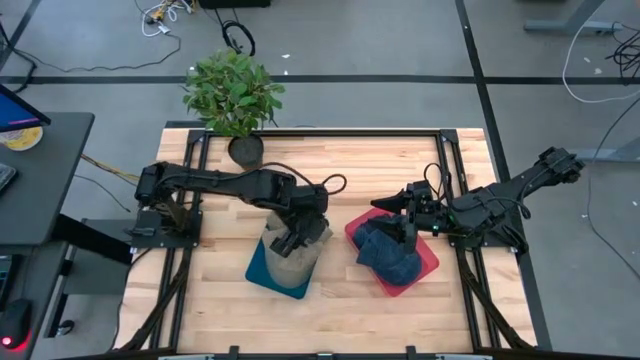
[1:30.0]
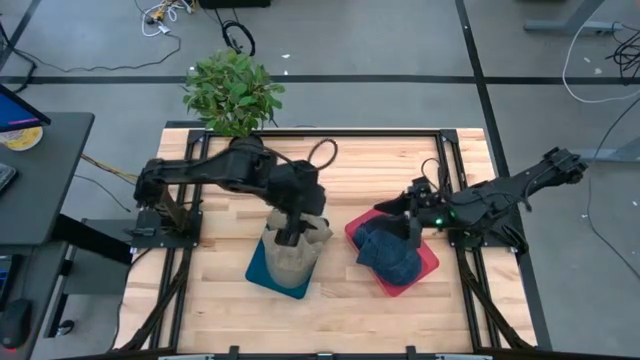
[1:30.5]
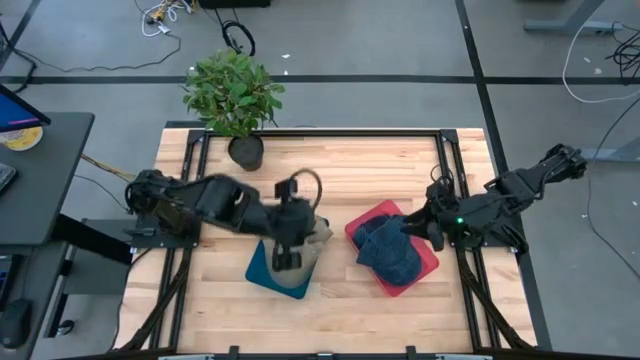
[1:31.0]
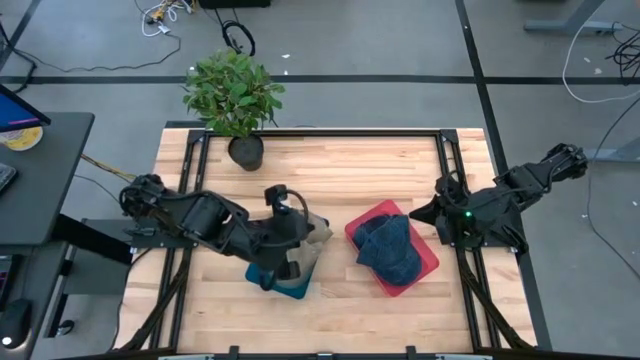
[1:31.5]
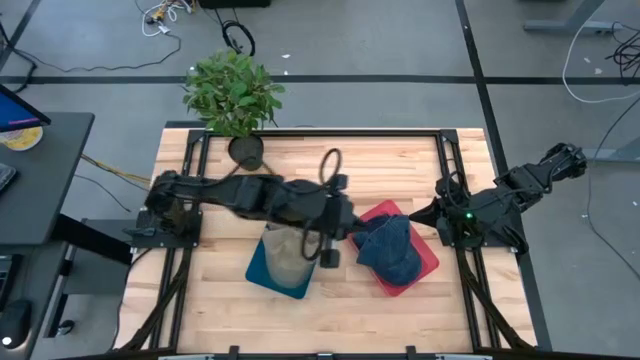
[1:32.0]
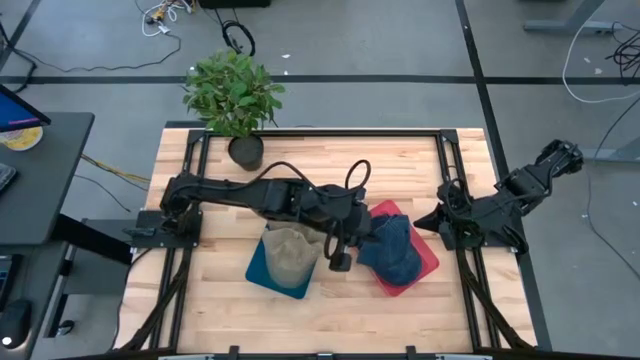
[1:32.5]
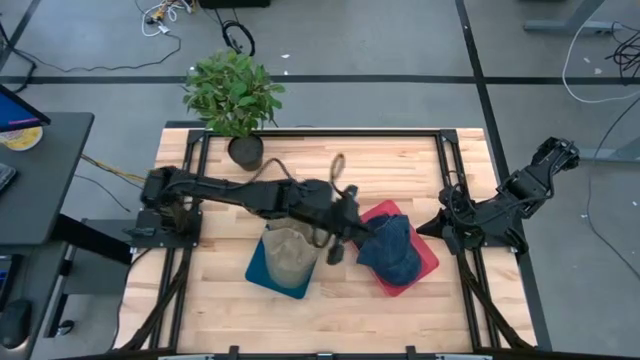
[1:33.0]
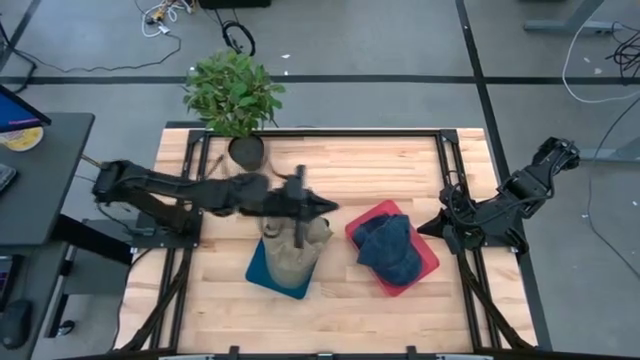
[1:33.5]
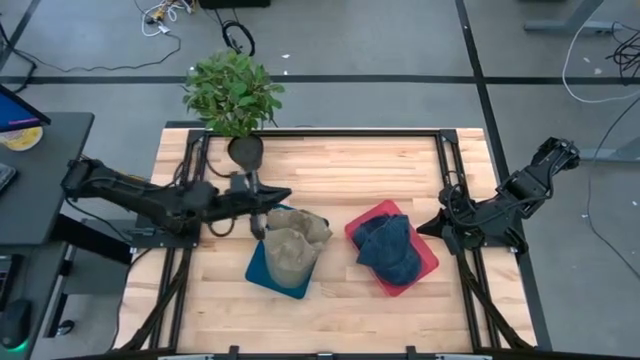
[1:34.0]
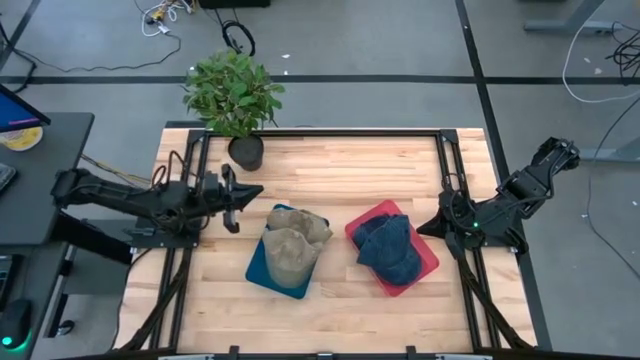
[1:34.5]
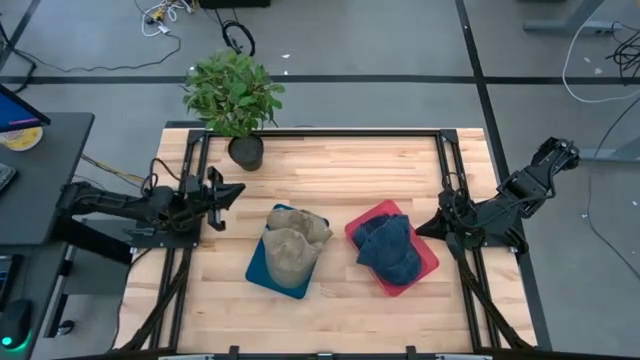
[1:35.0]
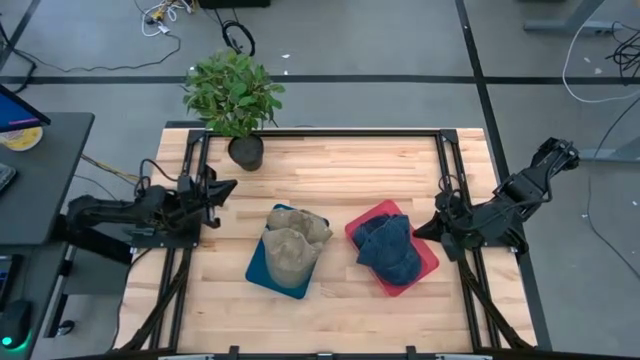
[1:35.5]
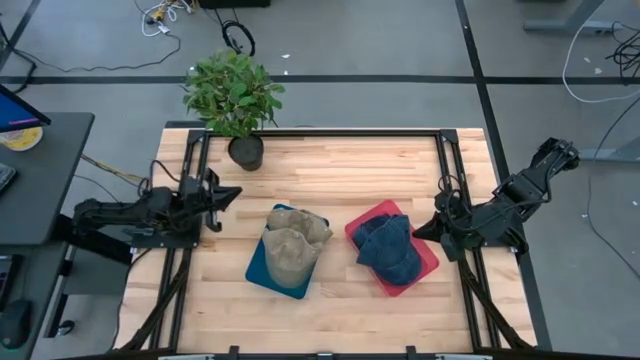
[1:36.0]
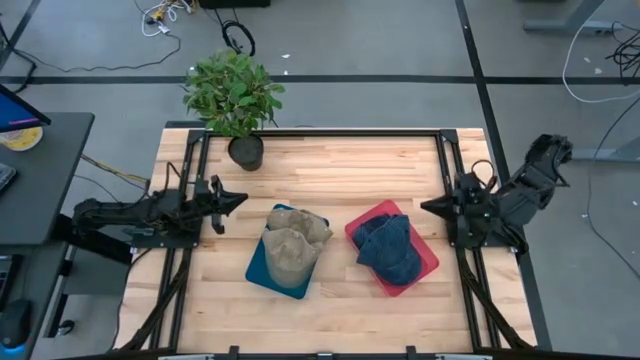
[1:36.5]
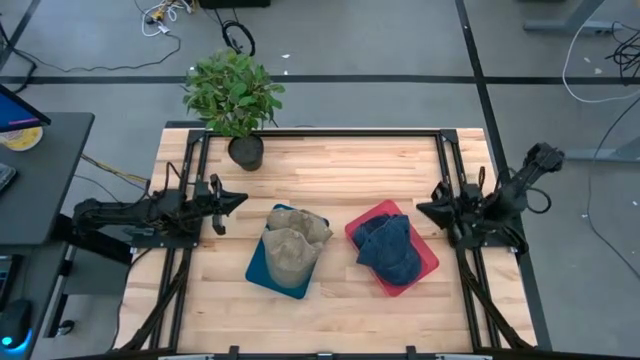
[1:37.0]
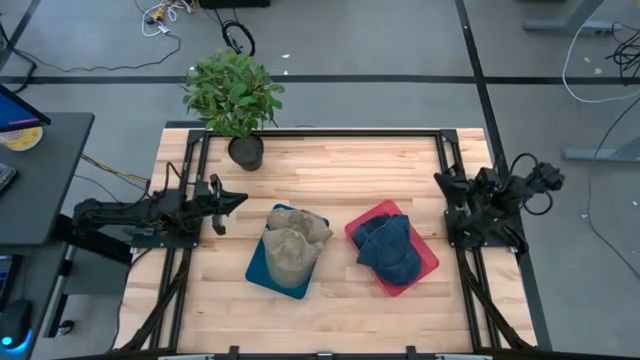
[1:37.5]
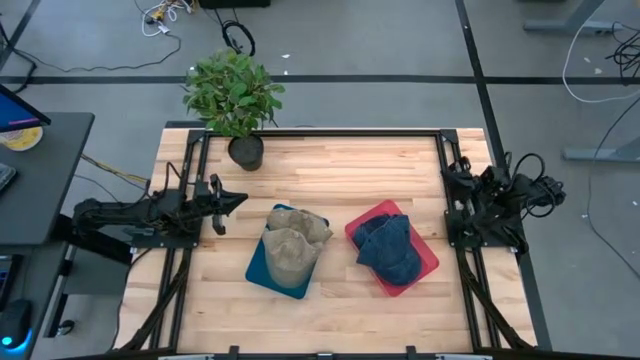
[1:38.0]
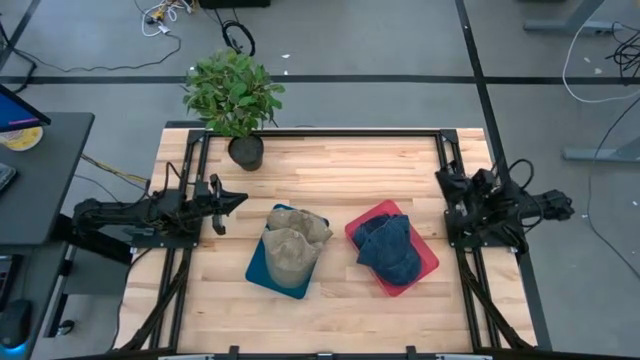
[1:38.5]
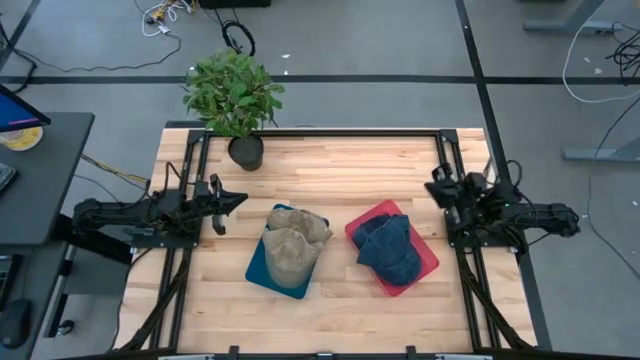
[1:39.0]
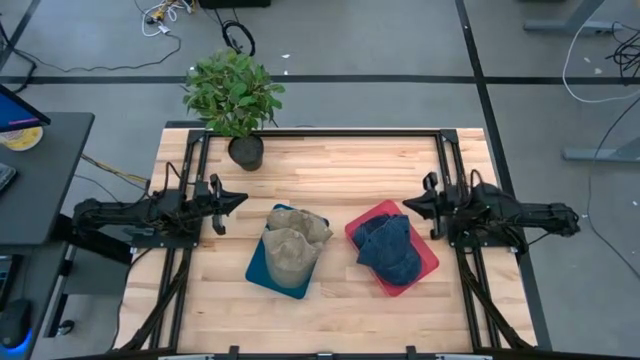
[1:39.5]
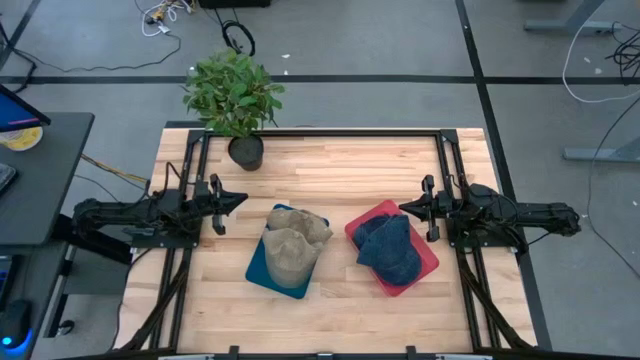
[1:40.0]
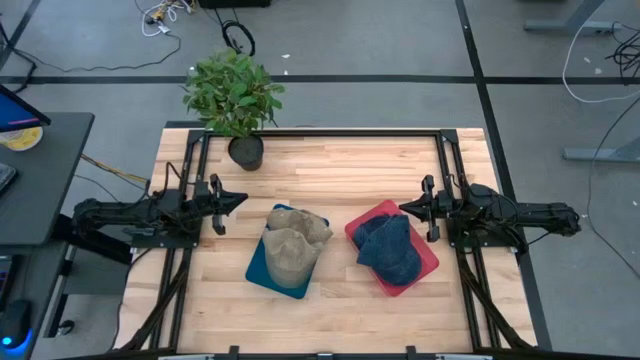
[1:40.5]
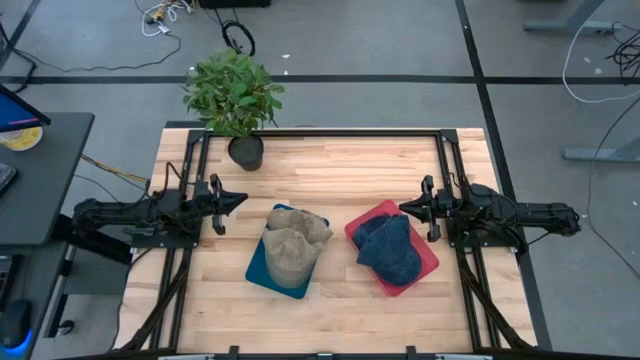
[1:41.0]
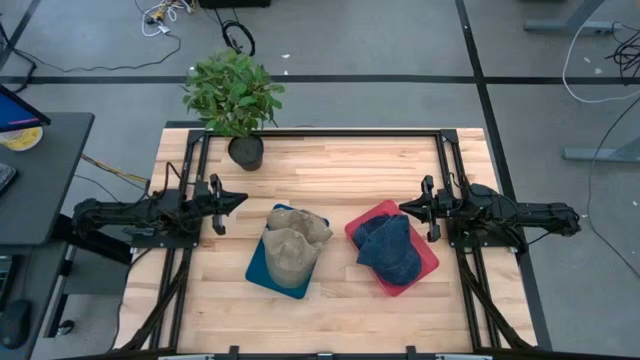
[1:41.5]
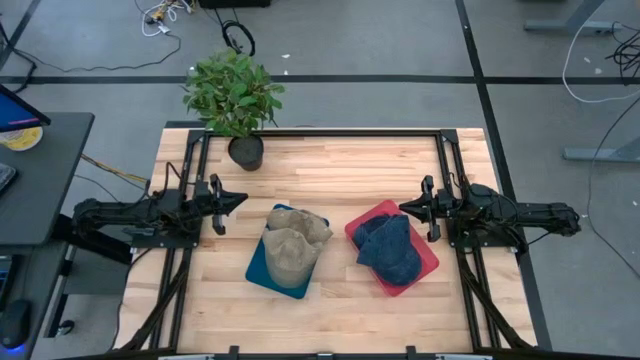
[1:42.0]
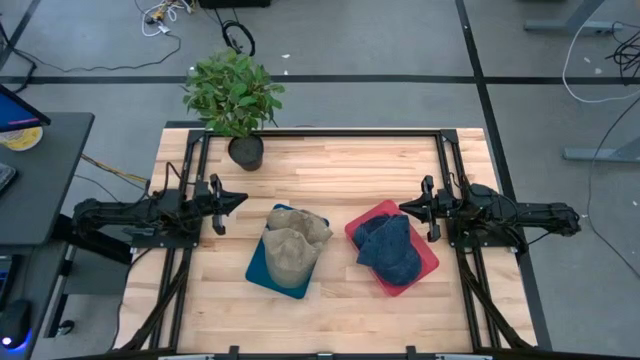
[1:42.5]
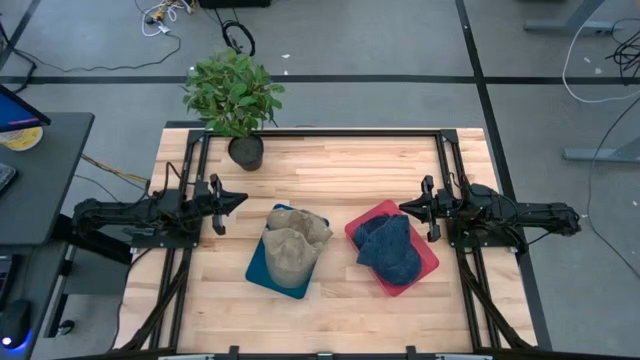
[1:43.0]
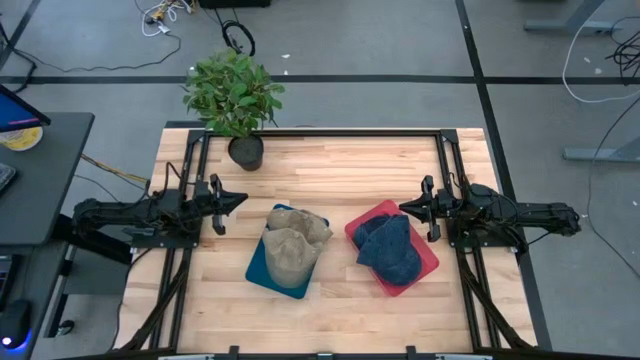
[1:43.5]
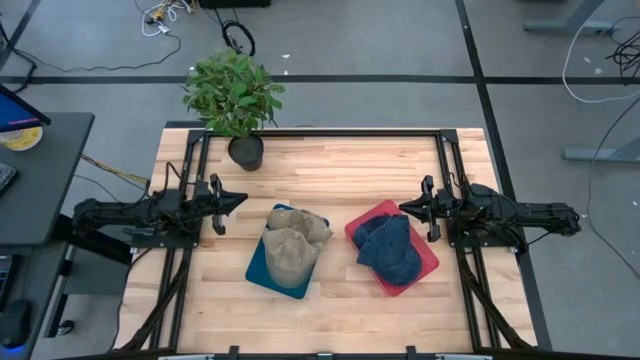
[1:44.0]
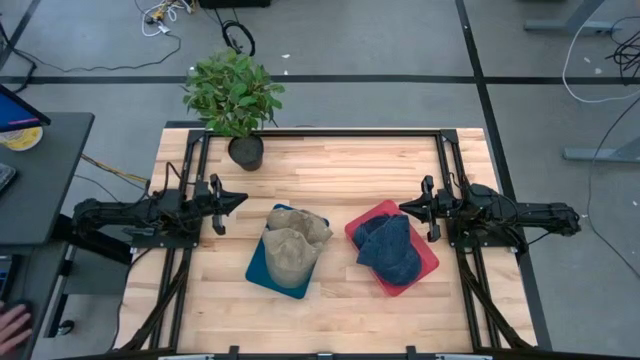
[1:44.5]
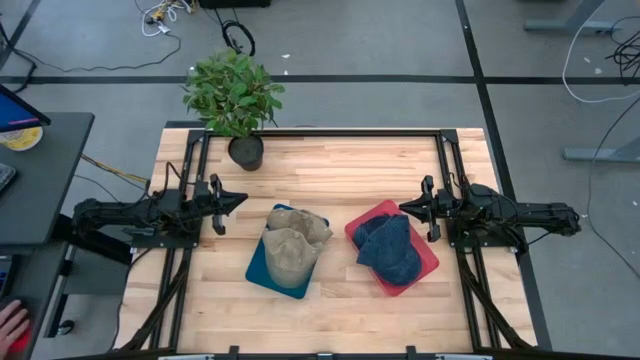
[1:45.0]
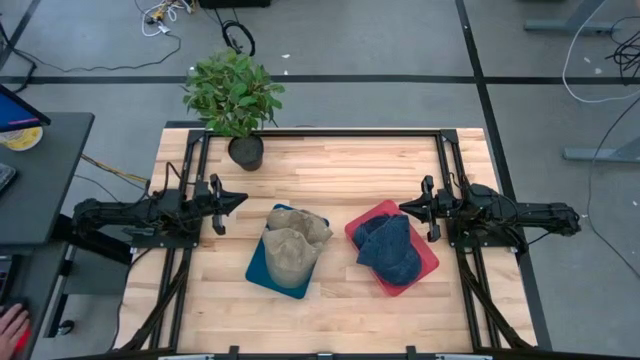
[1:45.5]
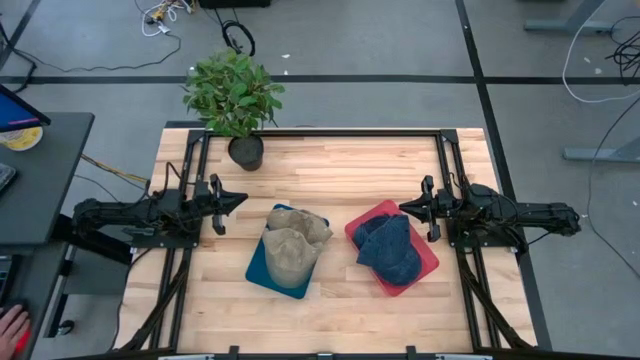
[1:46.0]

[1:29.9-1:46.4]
Task: Pick & Place hat
Return to Home Position

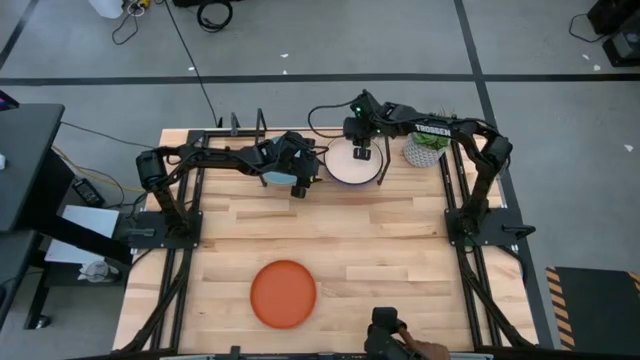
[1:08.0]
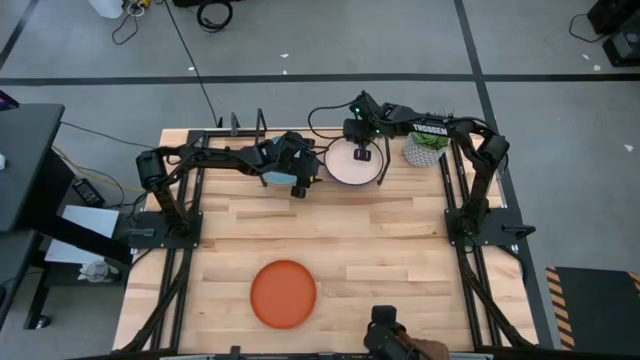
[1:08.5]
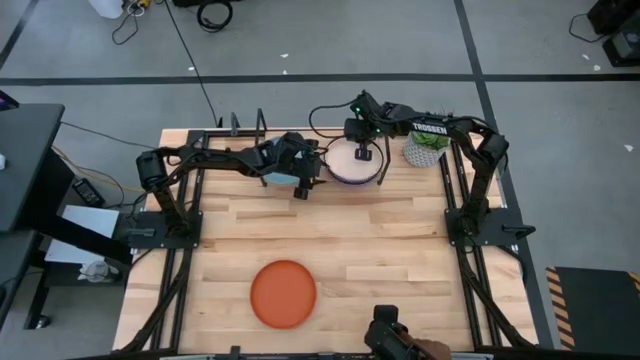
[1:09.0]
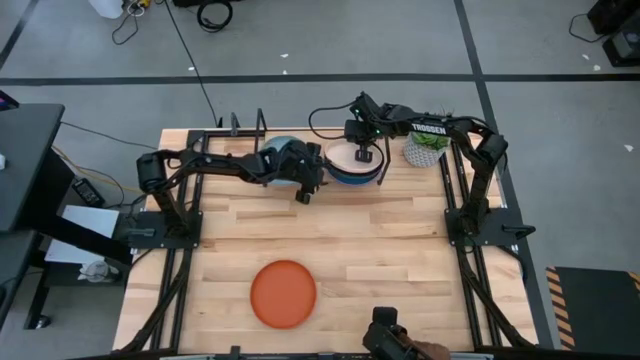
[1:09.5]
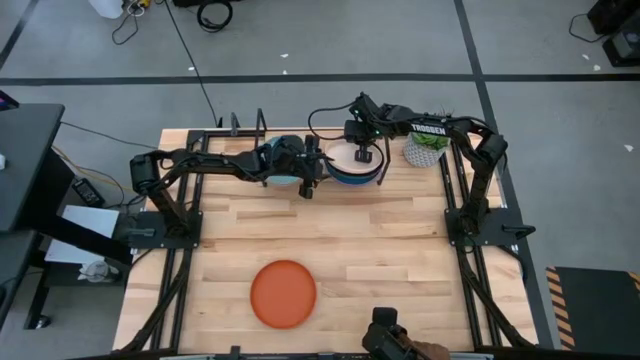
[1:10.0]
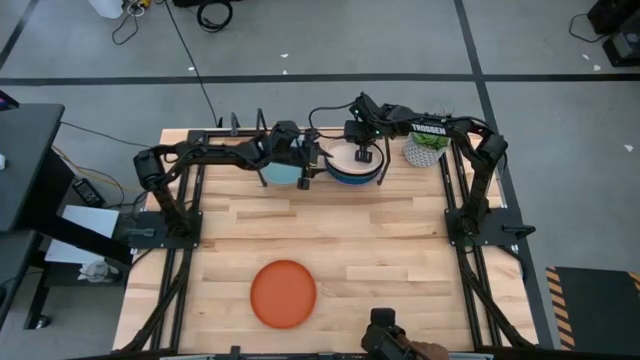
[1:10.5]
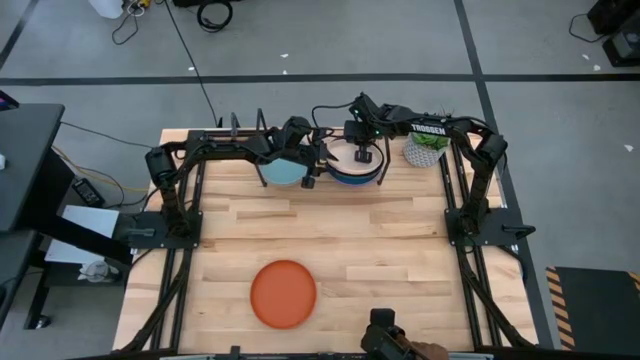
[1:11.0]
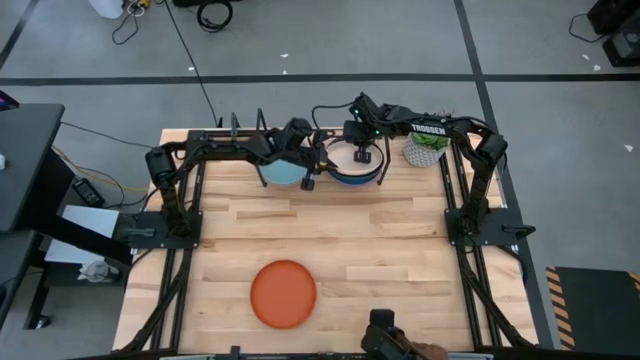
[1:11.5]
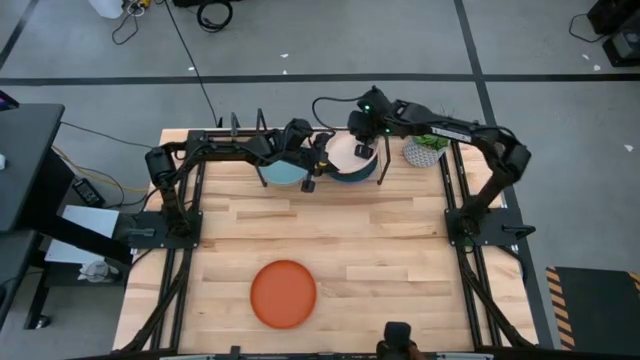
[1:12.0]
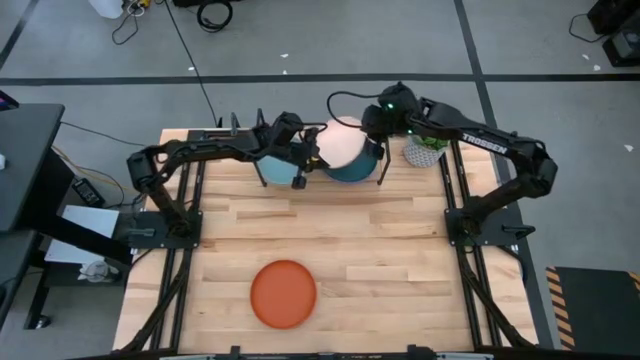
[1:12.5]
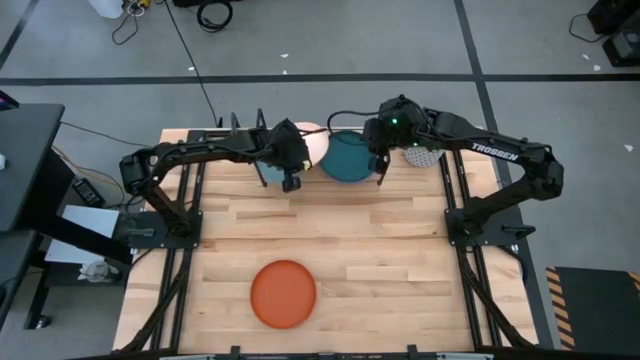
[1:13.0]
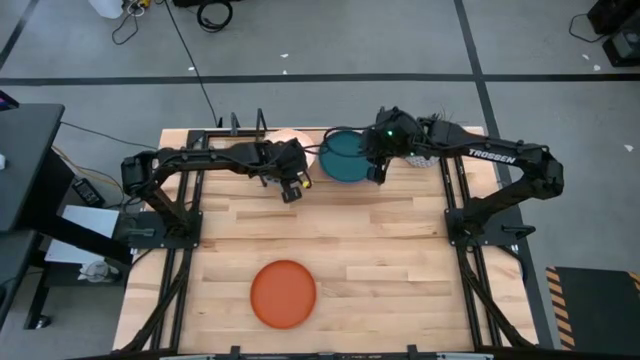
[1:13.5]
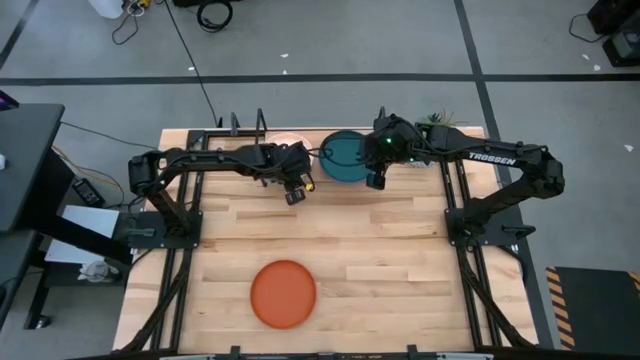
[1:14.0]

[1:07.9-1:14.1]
Task: Place and stack plates onto a shelf
Stack the light brown plate on top of the light blue plate on the shelf
